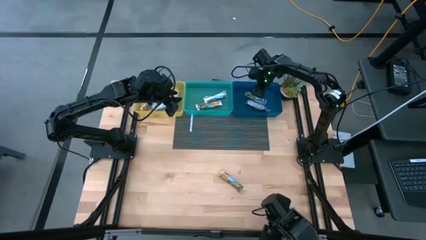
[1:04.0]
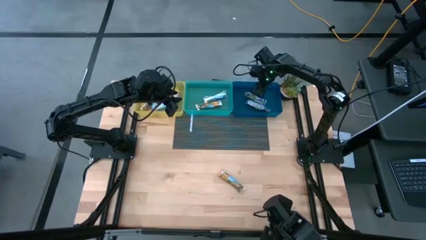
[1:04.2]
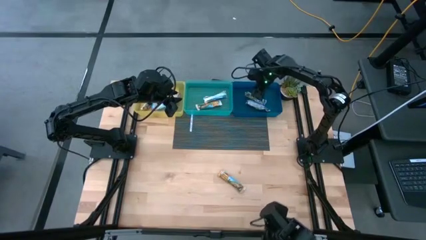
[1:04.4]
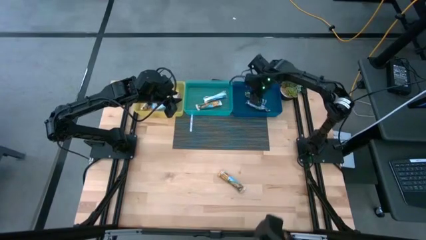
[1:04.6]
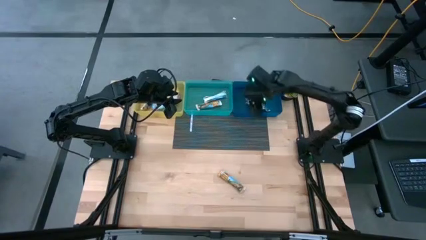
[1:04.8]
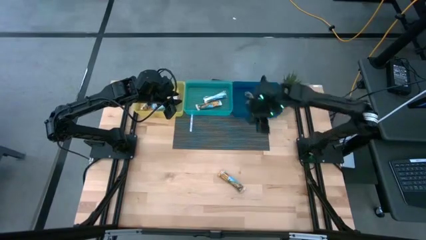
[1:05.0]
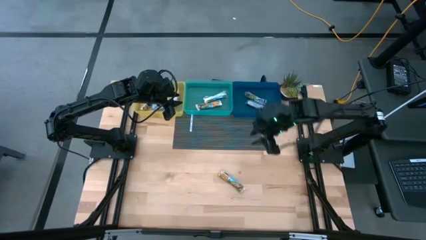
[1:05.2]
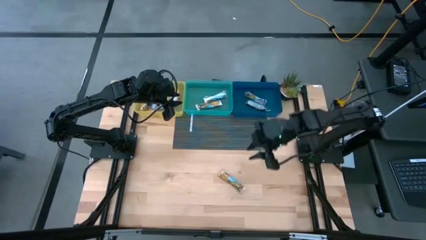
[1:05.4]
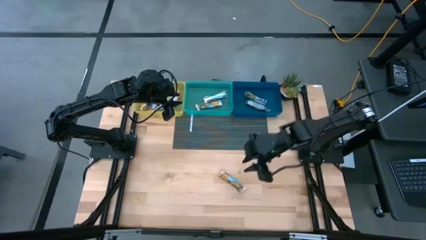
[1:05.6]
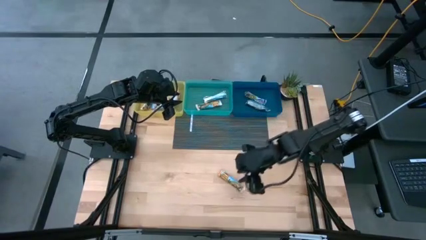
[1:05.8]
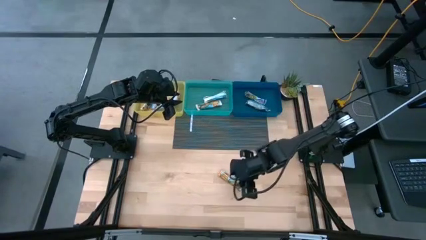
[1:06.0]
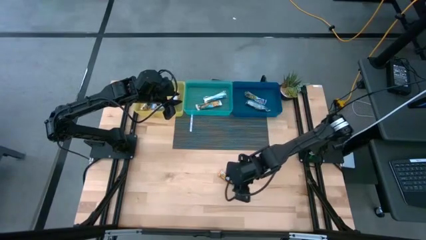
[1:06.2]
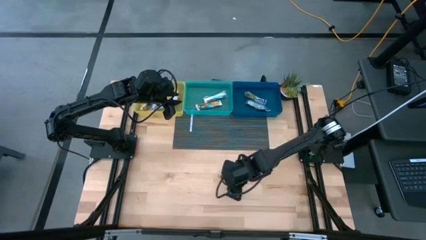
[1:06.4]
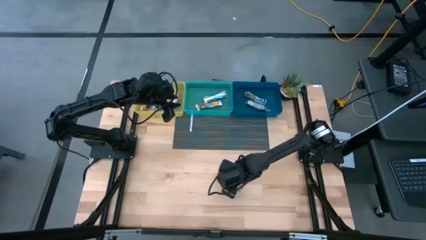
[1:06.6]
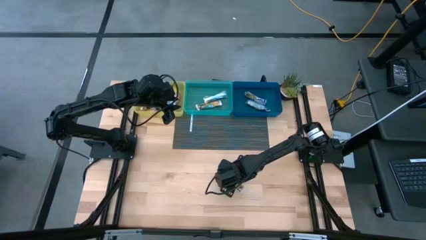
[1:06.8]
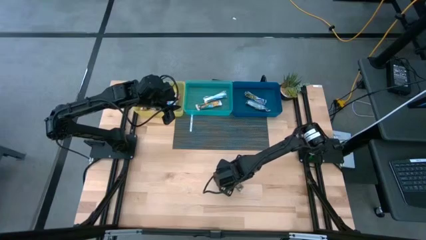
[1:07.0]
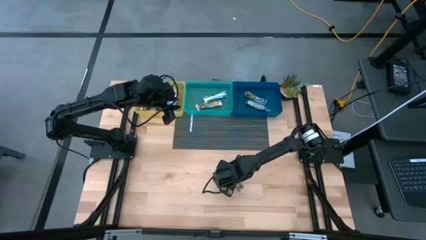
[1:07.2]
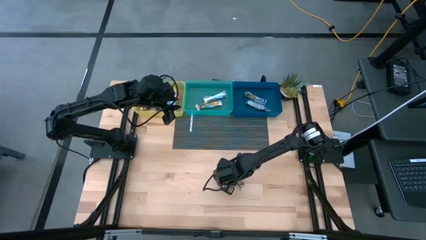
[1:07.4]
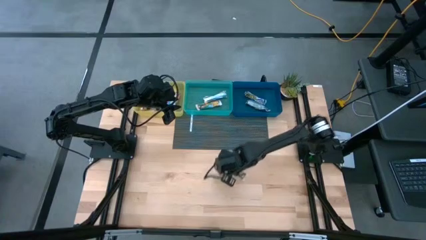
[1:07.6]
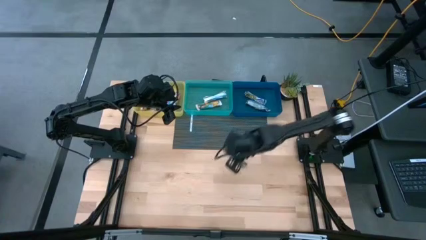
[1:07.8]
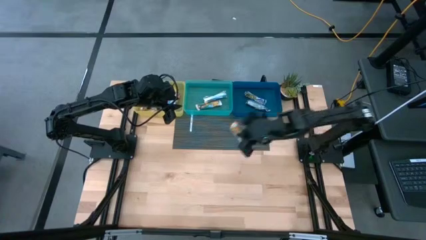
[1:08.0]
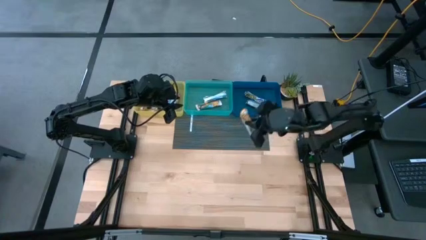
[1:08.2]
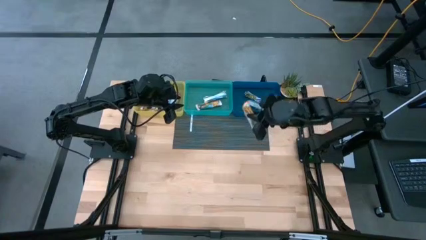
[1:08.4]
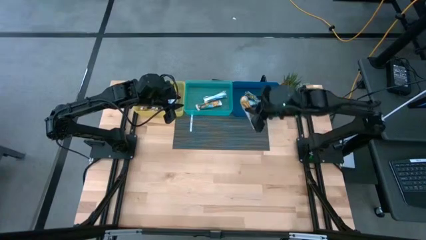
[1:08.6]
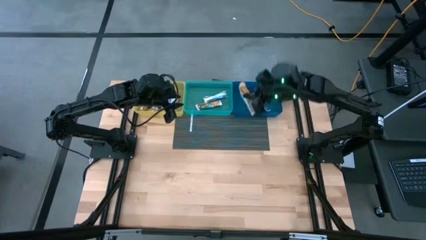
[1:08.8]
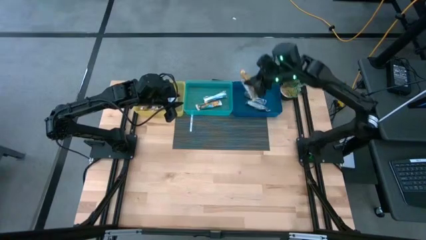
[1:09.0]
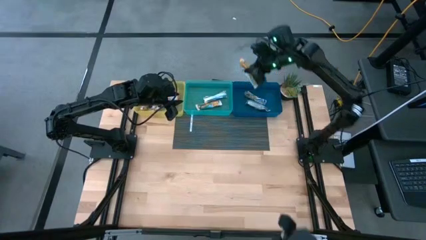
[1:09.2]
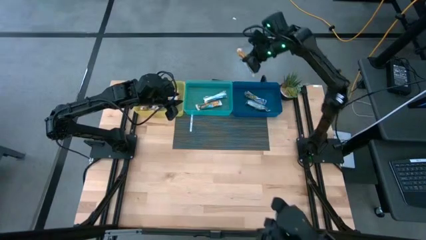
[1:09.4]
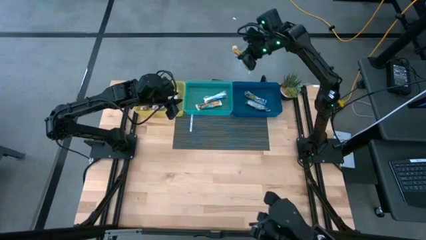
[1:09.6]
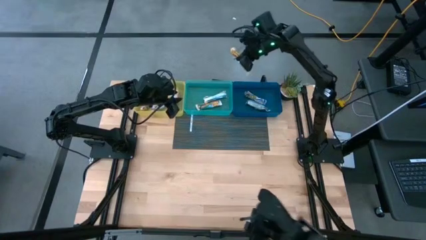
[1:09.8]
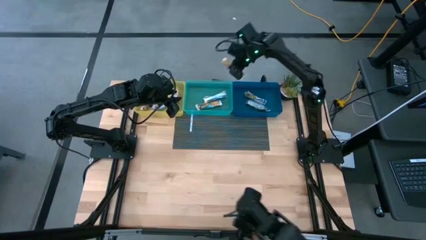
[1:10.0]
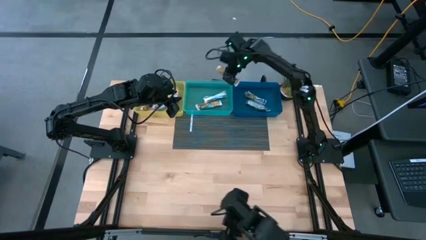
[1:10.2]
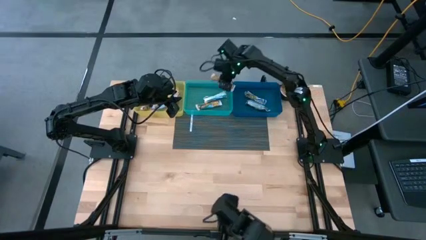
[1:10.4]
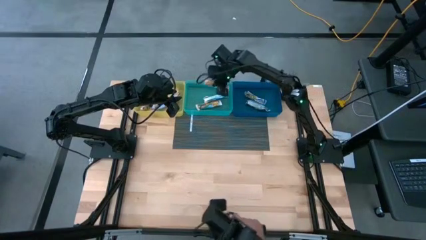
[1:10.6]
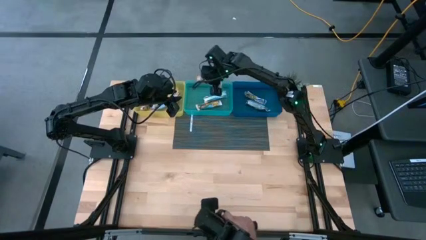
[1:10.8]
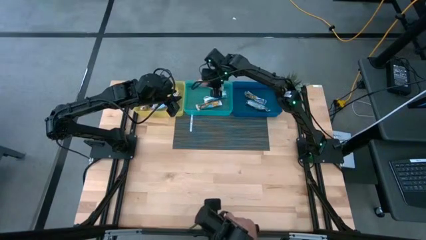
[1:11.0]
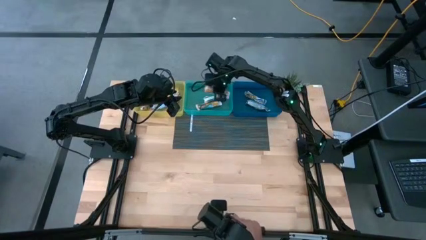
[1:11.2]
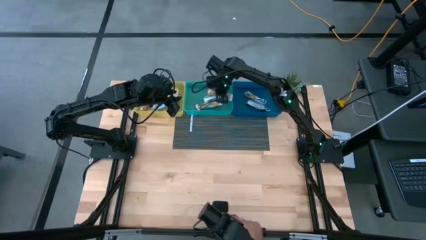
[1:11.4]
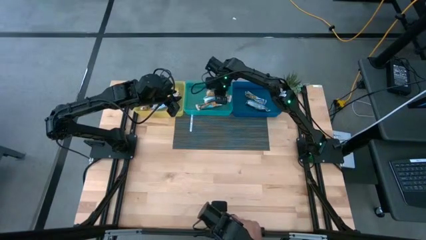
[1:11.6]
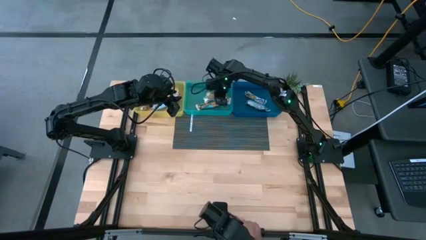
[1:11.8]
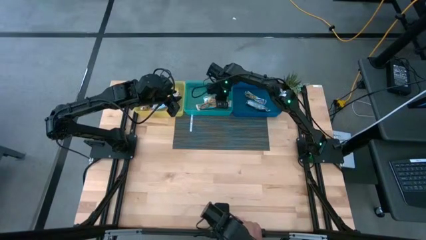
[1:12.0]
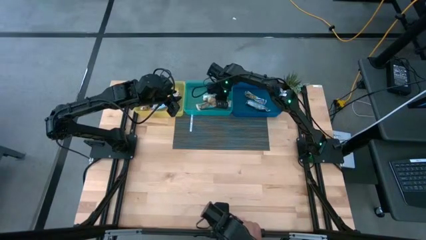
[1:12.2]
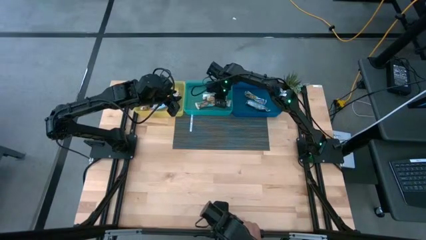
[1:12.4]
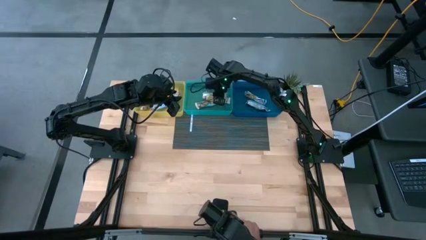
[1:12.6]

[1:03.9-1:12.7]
Task: Pick and place Granola Bars by type
Put the yellow granola bar into the green bin

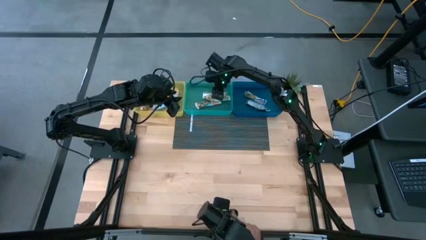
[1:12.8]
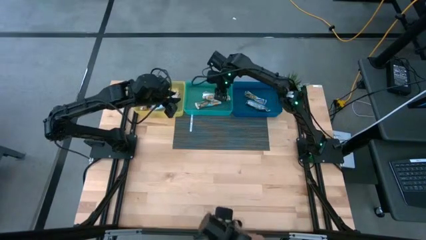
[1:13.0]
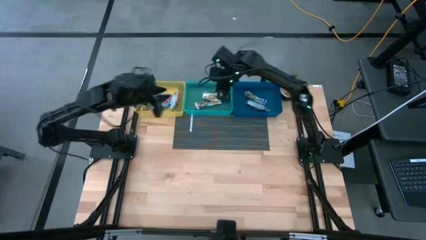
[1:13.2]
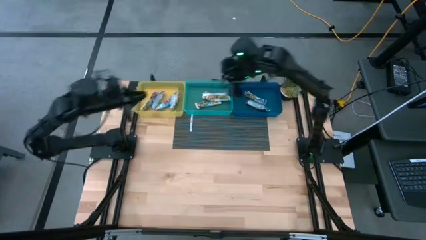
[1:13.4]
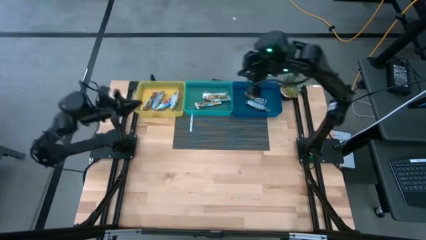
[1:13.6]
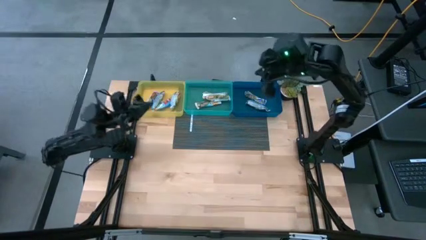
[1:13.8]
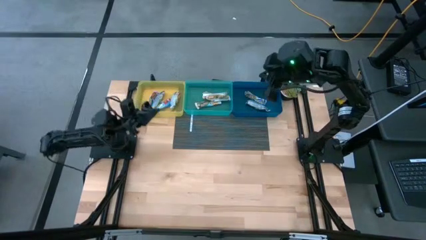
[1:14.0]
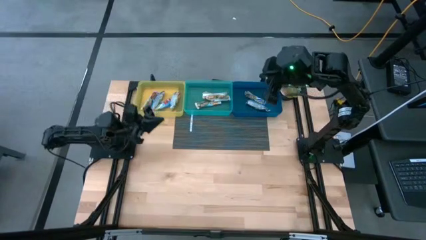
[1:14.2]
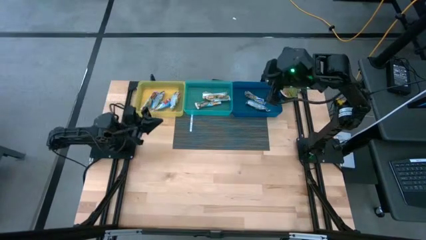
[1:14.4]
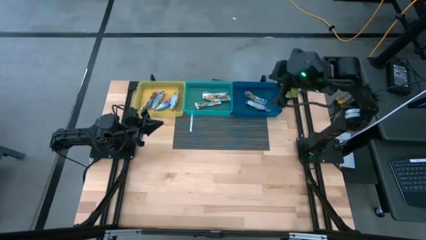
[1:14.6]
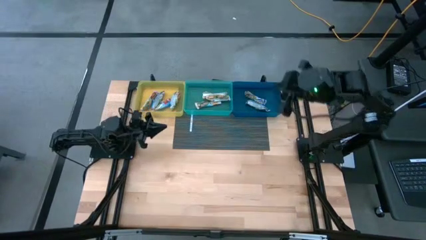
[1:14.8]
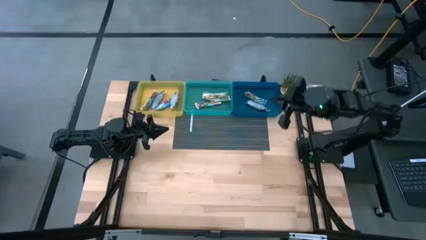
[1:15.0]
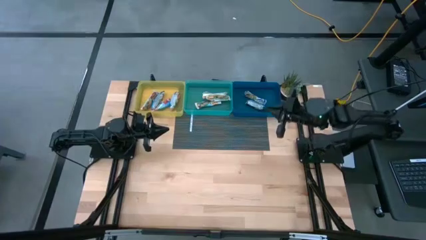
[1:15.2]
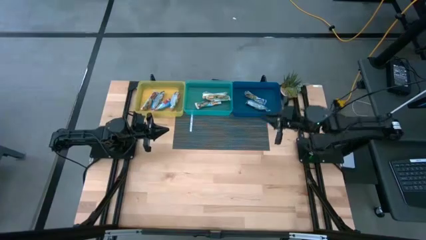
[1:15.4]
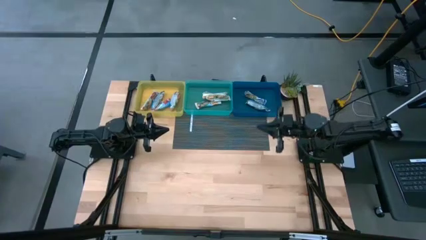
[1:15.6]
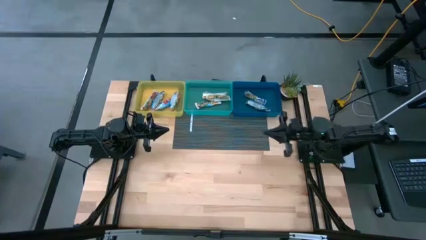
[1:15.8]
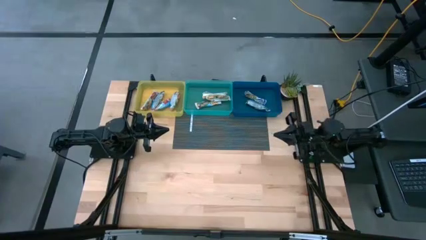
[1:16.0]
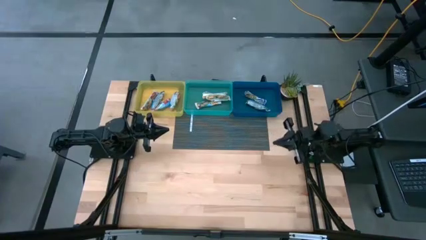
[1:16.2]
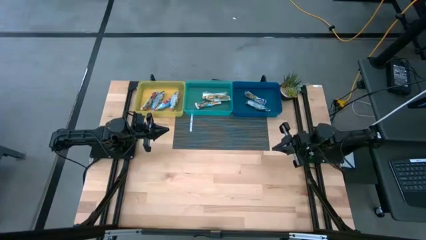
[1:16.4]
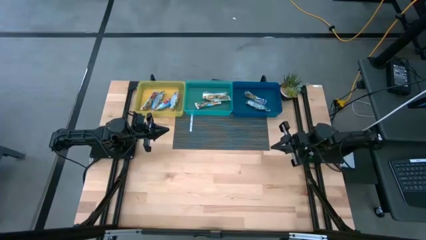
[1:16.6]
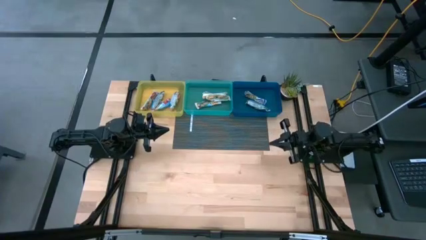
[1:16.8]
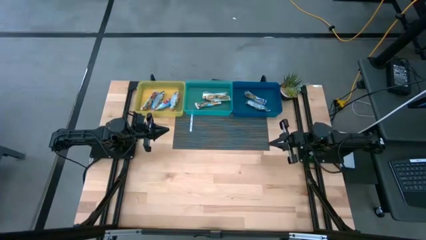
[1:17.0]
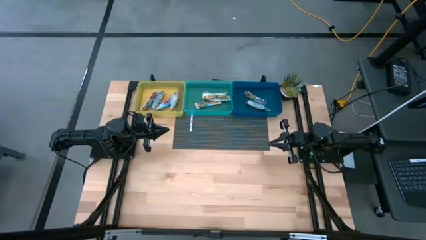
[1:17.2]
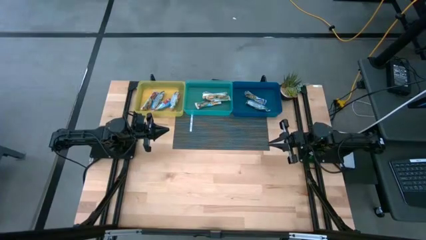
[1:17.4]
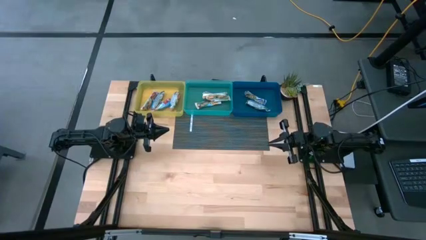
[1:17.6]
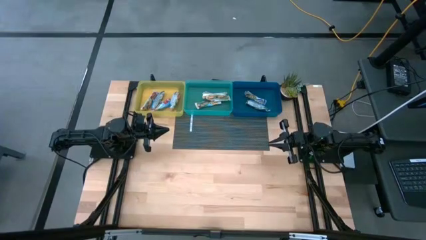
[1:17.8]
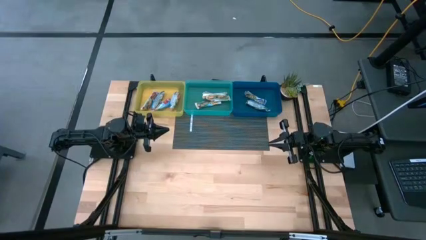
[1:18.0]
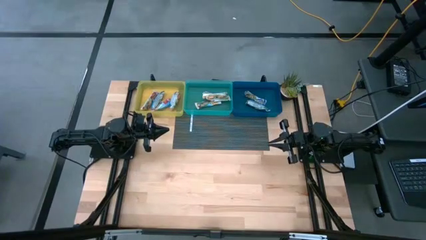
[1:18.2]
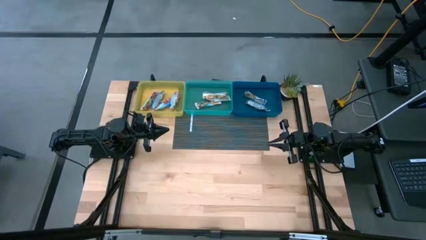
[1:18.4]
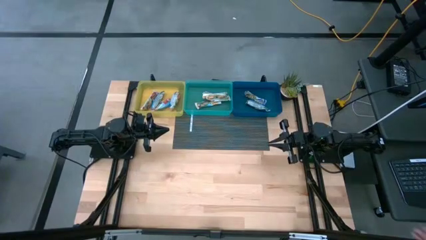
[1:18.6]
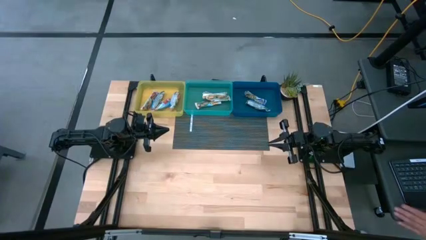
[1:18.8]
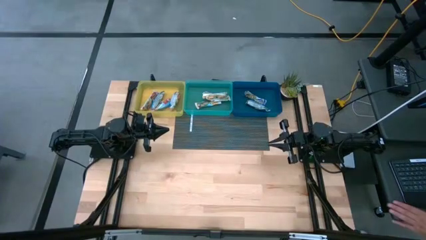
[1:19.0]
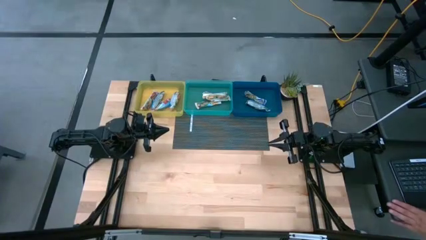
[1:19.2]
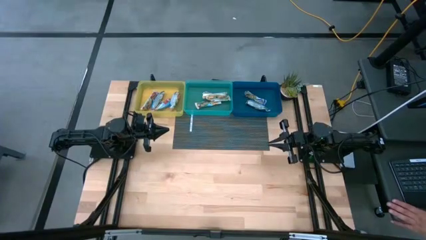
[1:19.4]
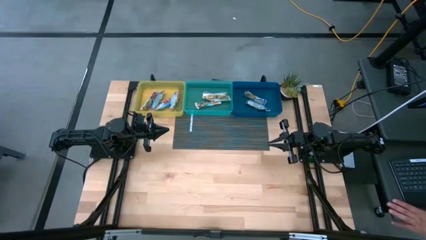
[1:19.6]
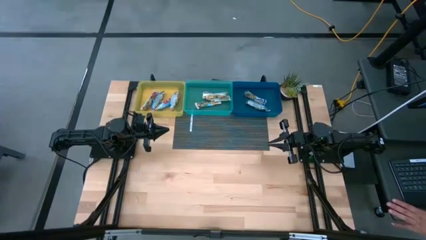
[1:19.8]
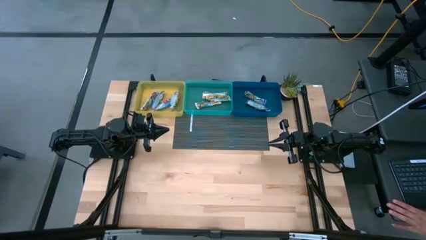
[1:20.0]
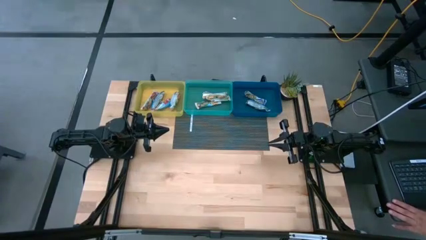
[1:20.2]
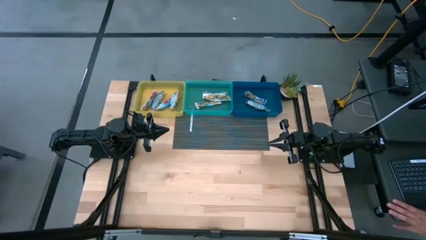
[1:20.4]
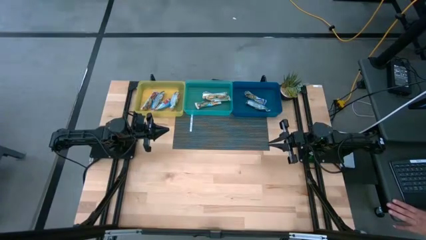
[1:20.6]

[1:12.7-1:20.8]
Return to Home Position
